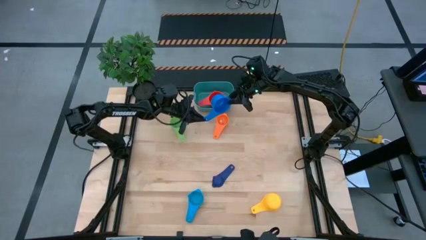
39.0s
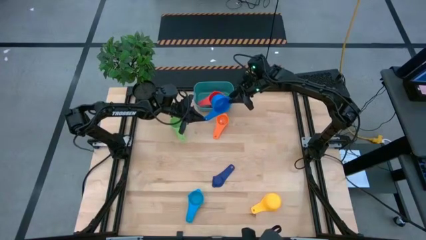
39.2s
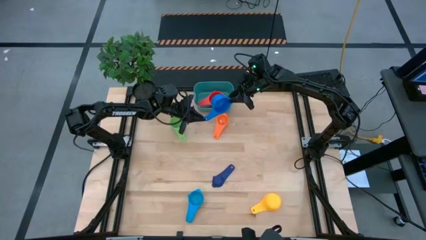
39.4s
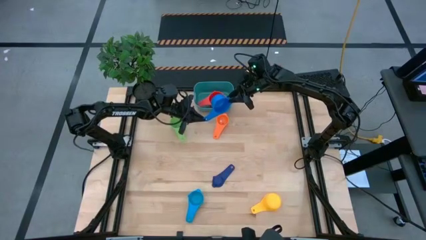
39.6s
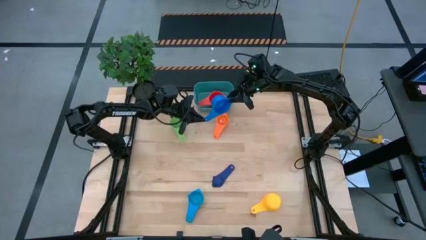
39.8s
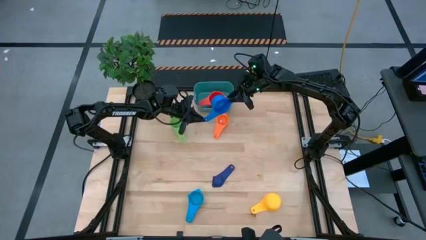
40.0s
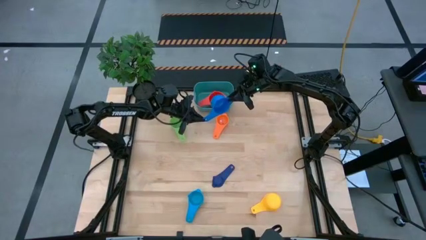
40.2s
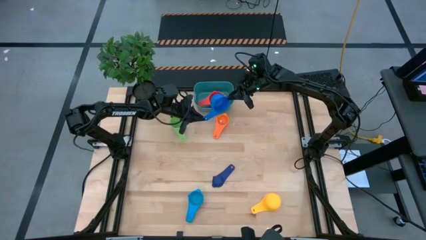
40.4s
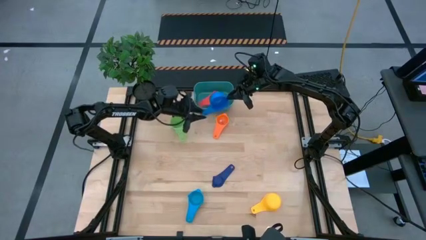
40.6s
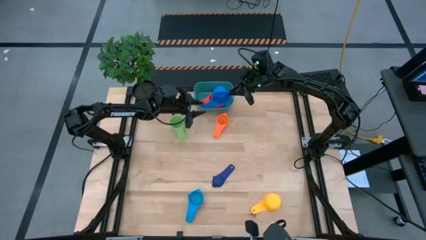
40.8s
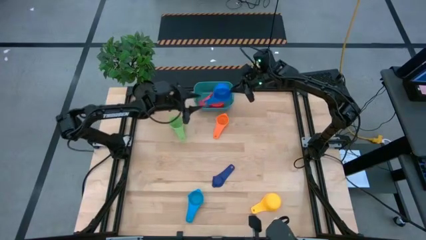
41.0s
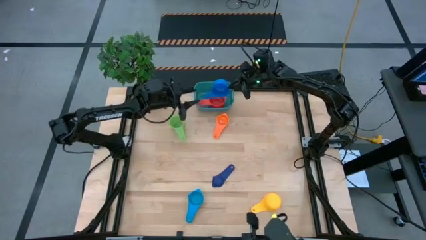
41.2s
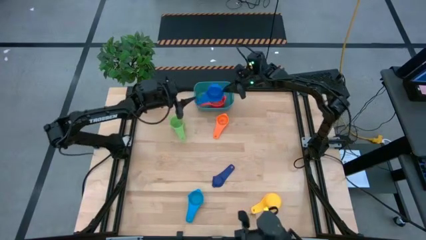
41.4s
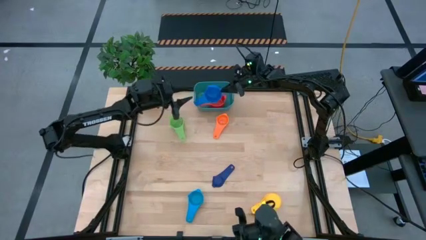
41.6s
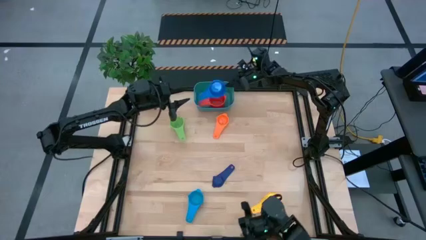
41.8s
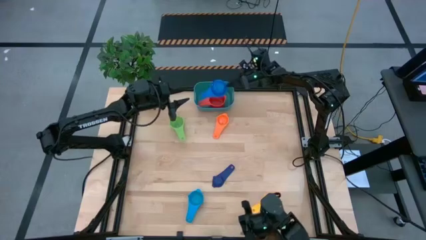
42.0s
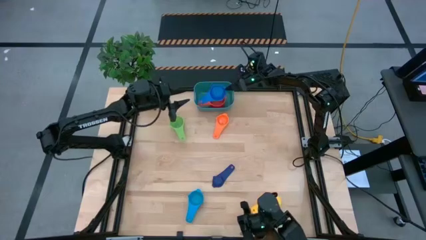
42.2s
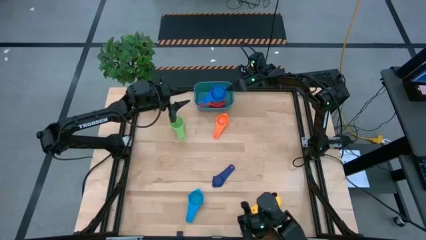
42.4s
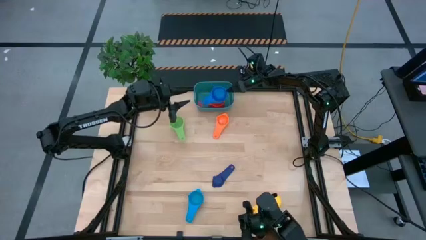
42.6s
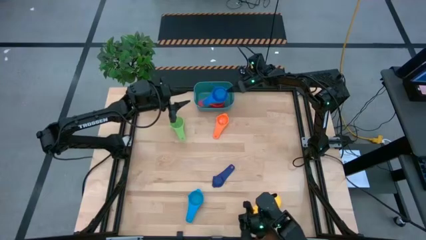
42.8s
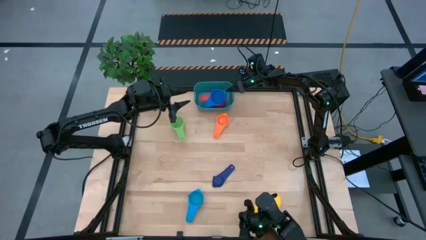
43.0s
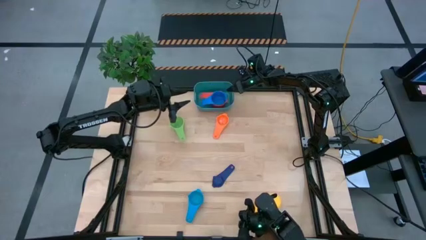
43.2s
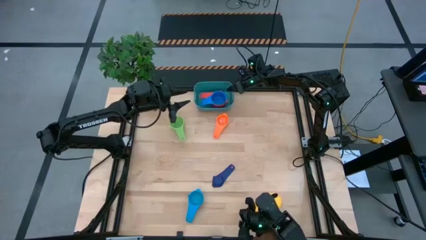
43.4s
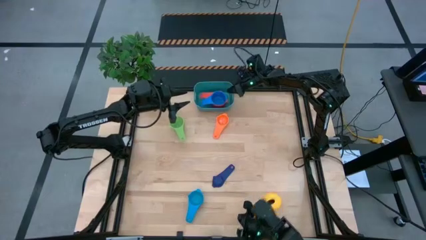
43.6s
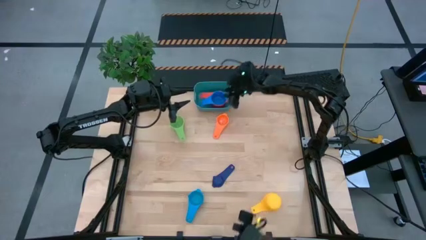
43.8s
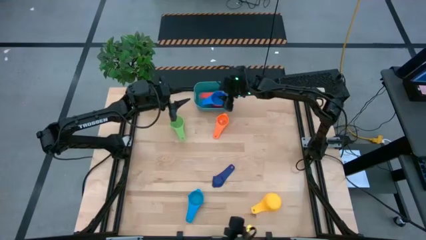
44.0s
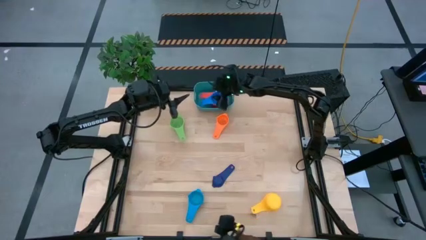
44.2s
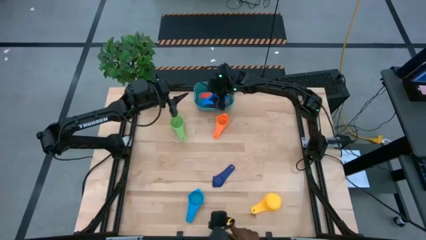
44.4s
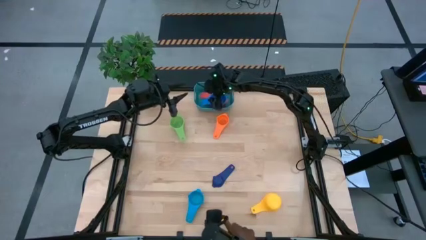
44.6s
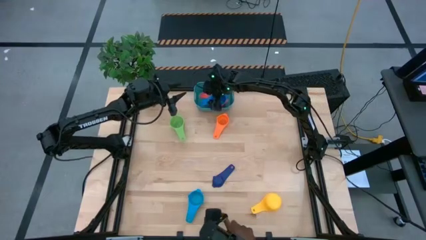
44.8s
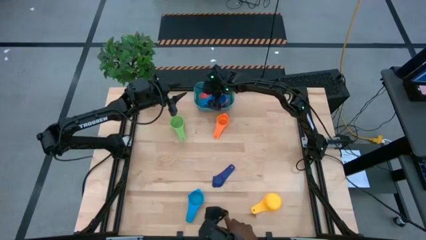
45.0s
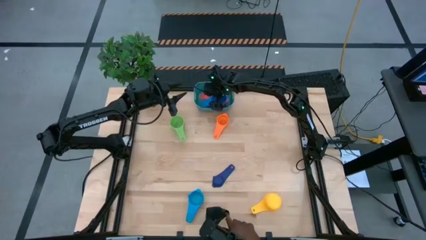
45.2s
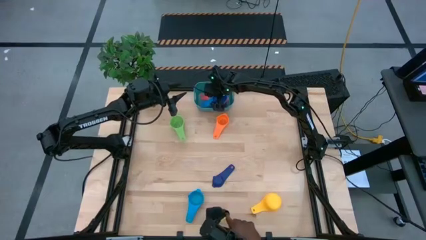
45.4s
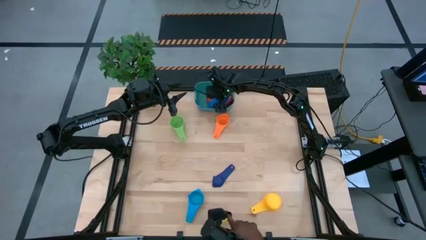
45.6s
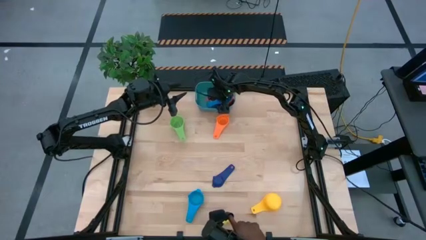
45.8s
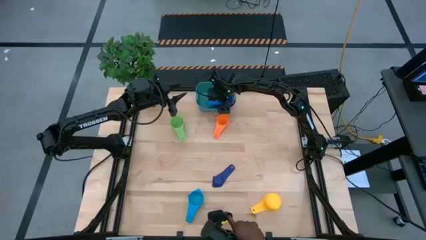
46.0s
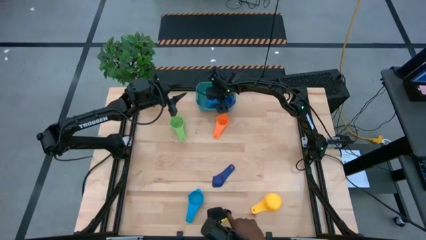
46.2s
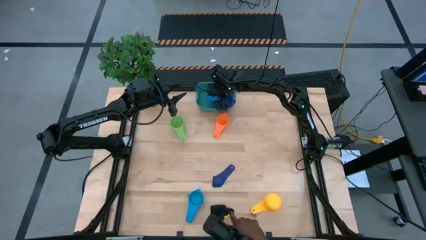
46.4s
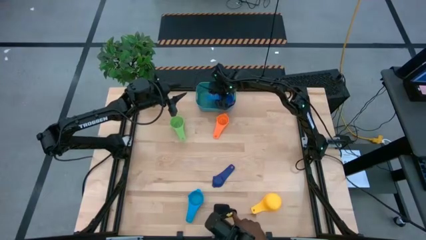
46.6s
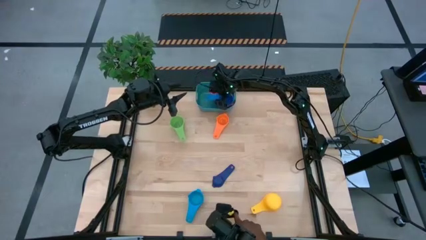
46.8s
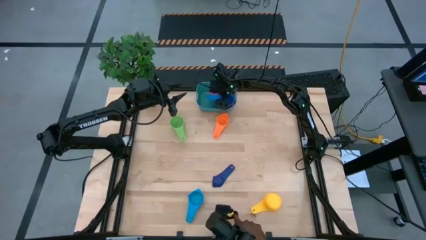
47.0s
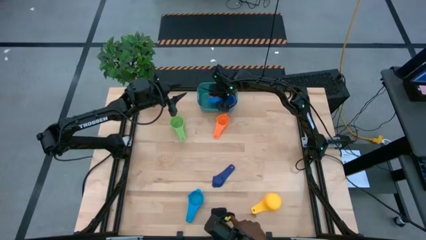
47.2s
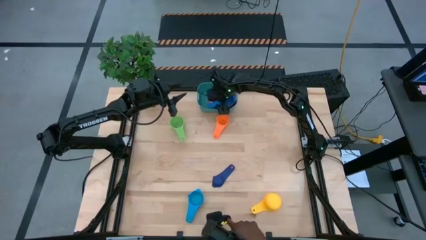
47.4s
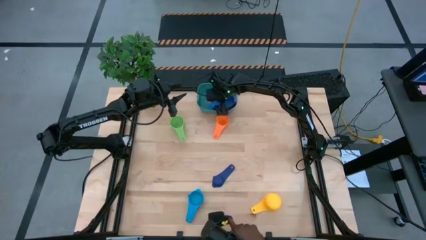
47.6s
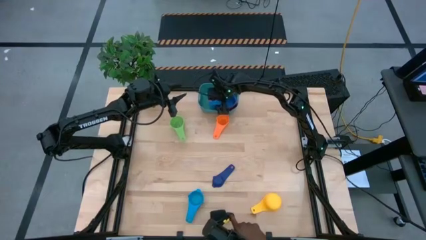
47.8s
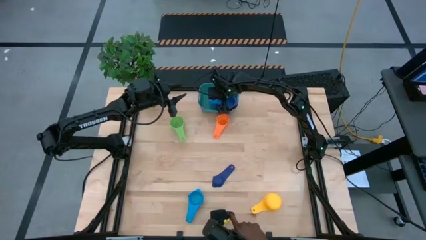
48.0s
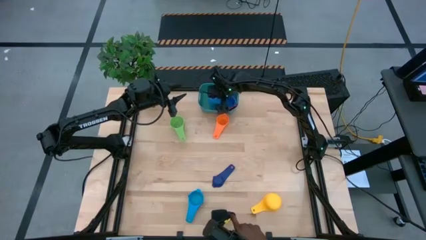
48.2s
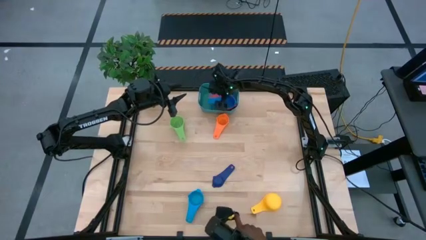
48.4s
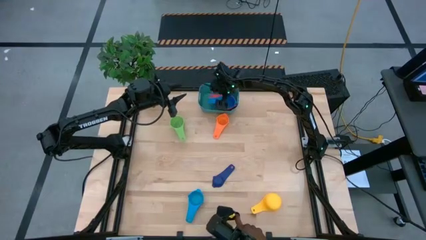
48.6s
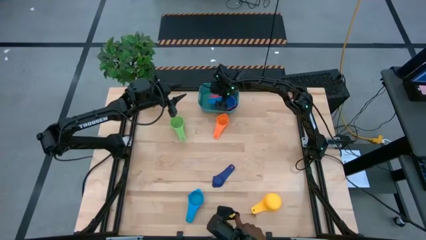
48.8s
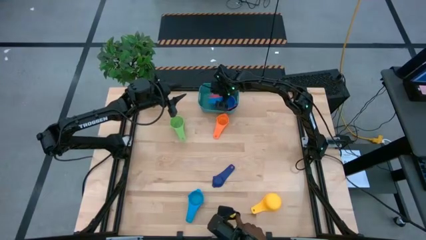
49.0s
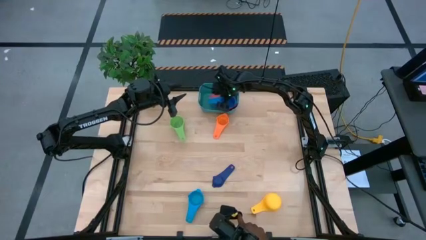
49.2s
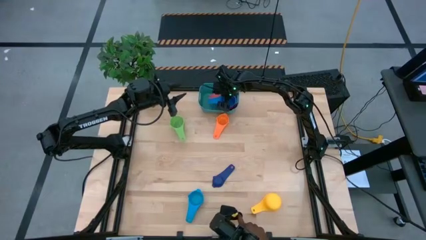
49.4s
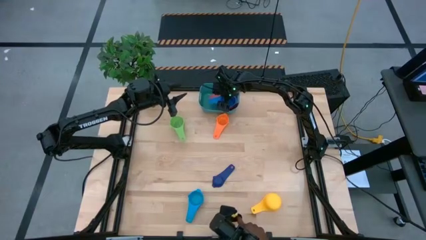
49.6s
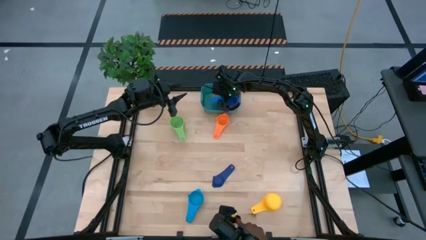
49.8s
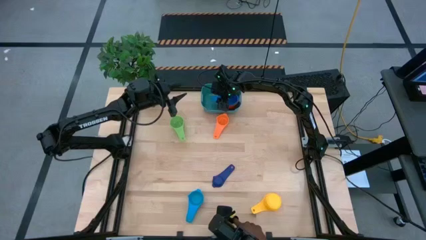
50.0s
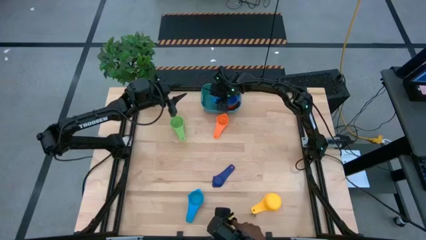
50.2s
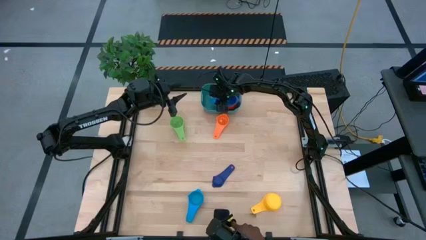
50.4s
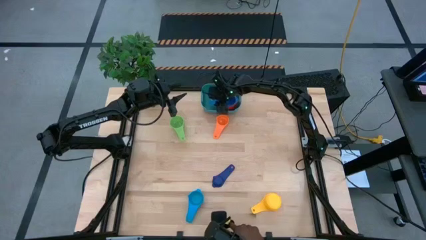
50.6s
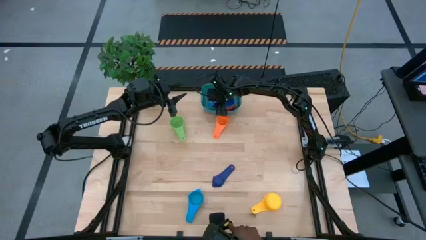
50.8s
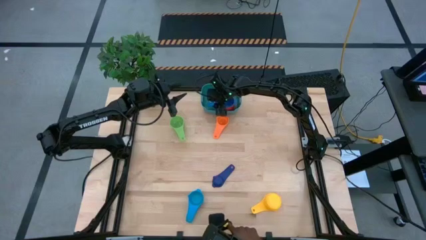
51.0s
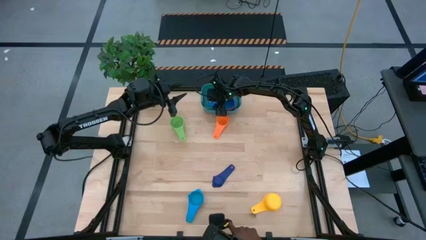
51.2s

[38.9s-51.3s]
Task: Nest measuring cups in basket
Stack the blue measuring cup on top of the red measuring cup in the blue bin
